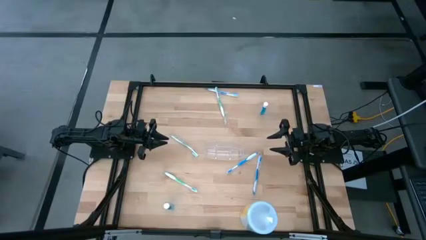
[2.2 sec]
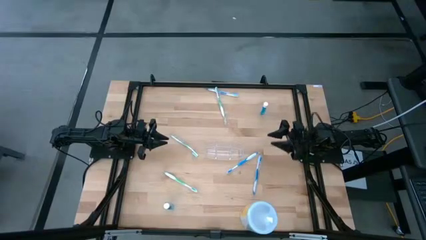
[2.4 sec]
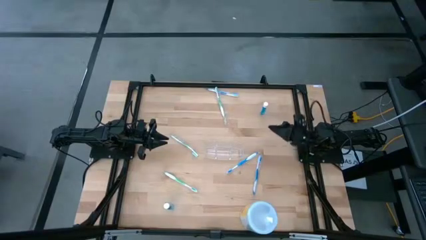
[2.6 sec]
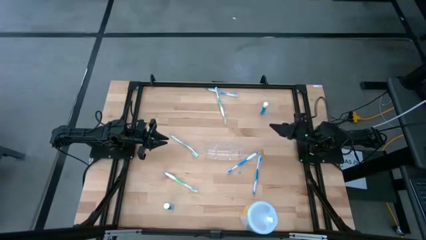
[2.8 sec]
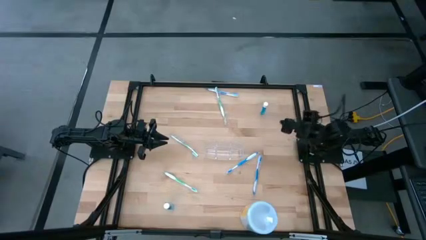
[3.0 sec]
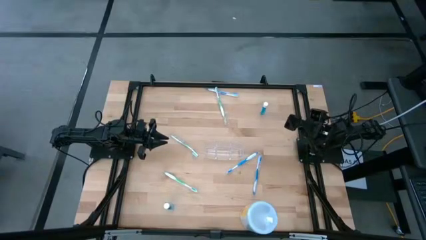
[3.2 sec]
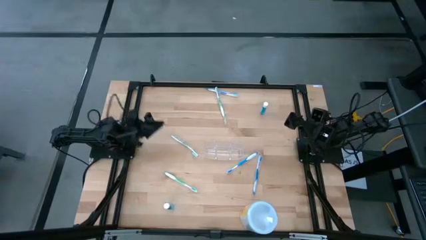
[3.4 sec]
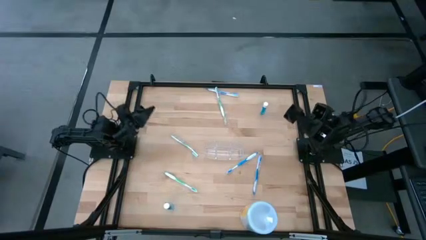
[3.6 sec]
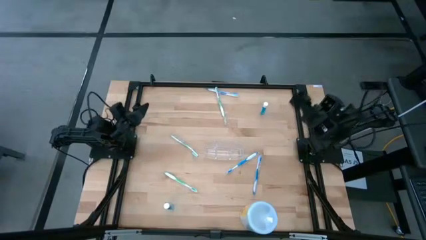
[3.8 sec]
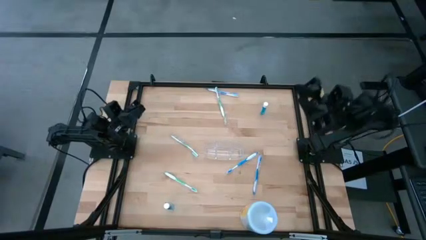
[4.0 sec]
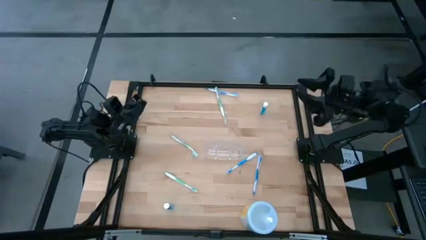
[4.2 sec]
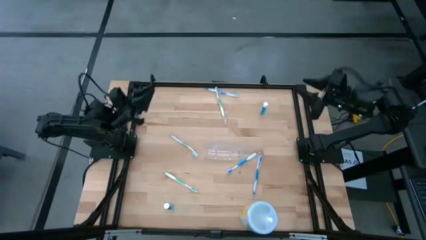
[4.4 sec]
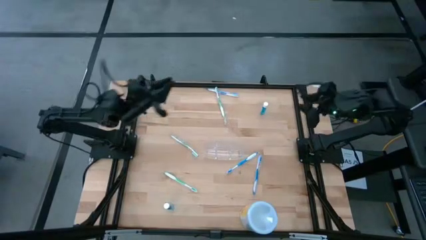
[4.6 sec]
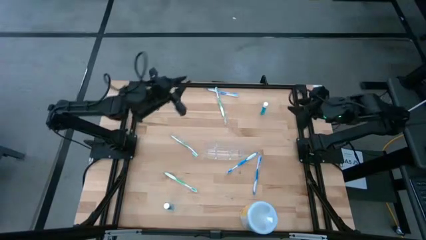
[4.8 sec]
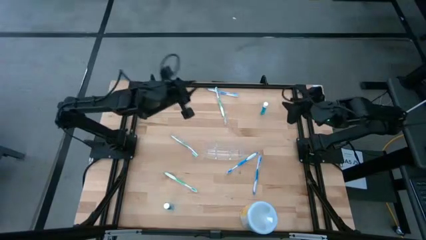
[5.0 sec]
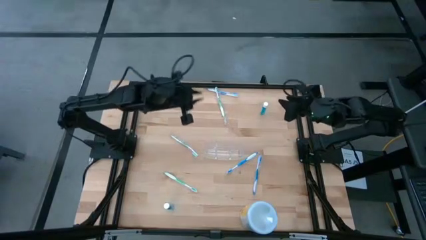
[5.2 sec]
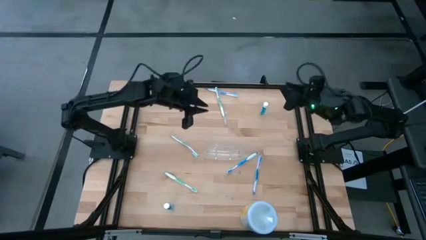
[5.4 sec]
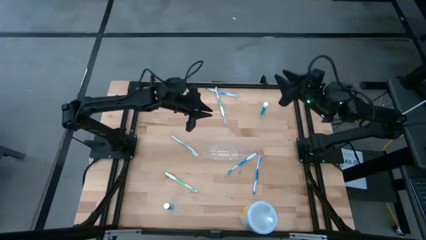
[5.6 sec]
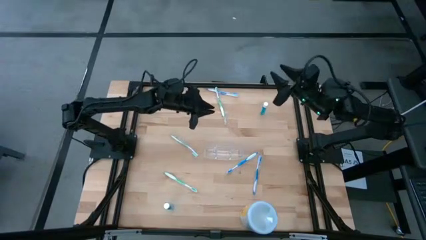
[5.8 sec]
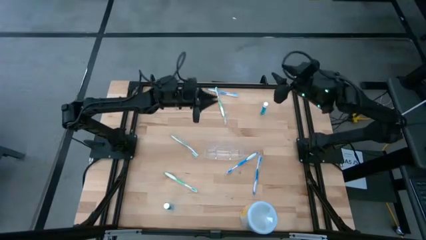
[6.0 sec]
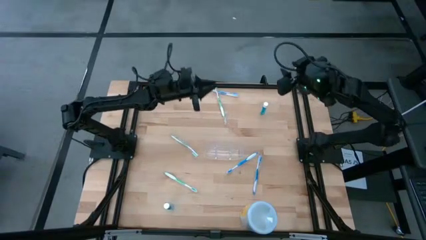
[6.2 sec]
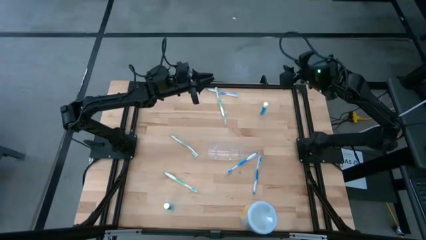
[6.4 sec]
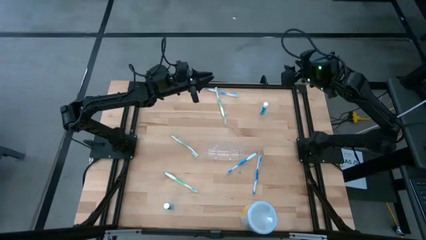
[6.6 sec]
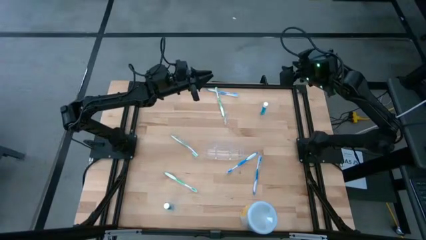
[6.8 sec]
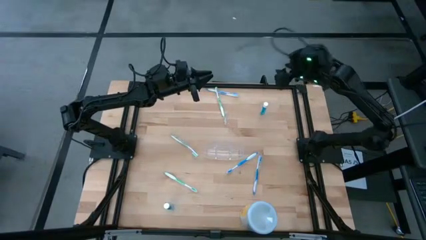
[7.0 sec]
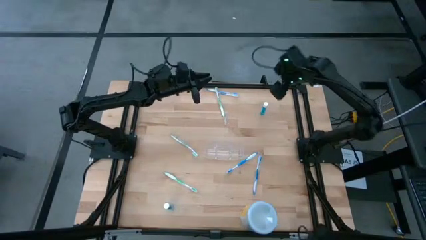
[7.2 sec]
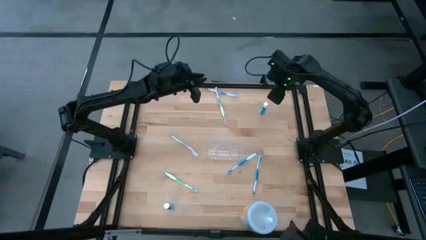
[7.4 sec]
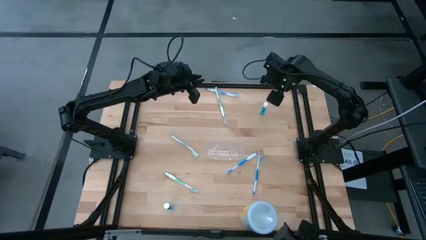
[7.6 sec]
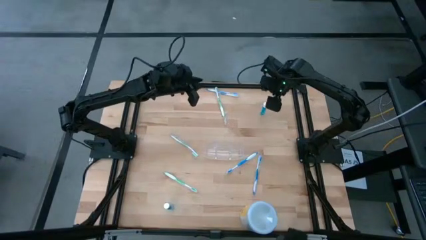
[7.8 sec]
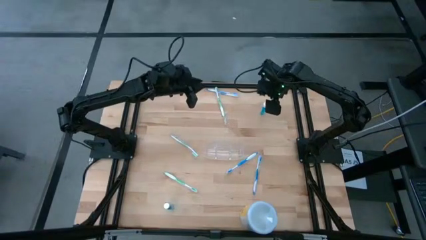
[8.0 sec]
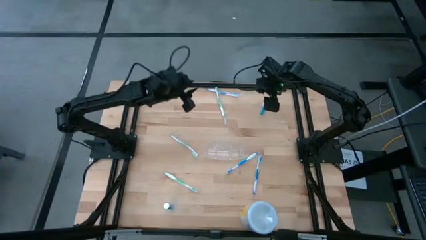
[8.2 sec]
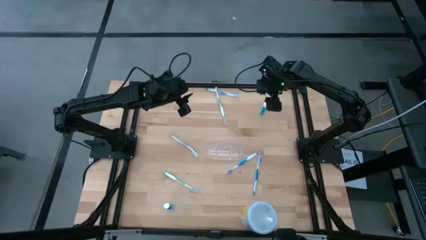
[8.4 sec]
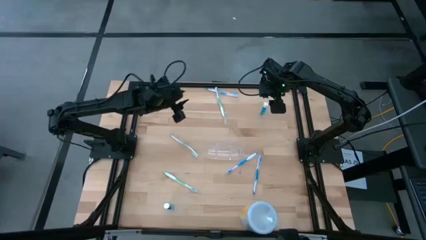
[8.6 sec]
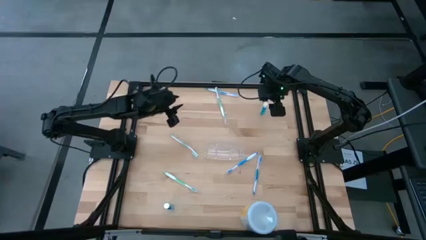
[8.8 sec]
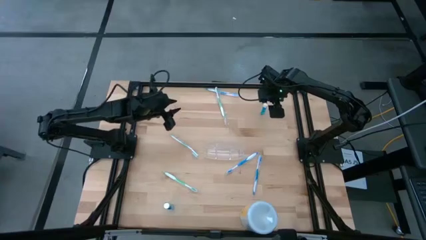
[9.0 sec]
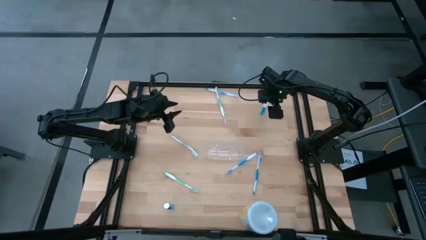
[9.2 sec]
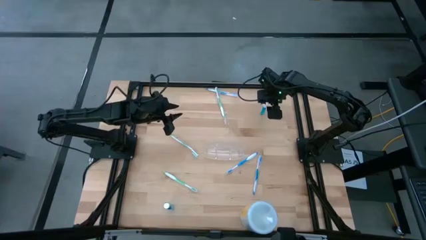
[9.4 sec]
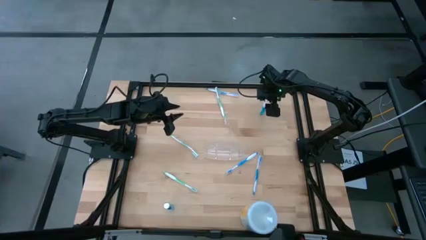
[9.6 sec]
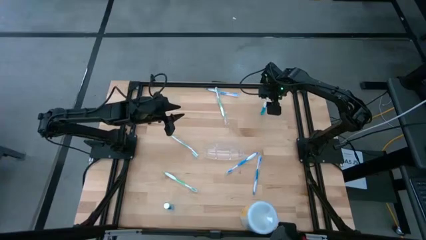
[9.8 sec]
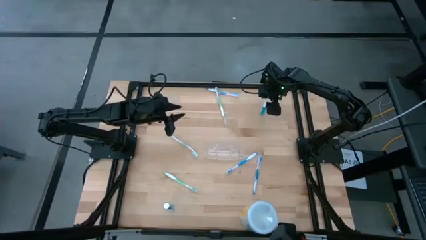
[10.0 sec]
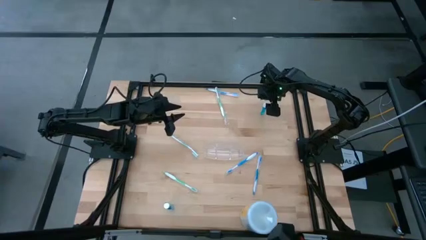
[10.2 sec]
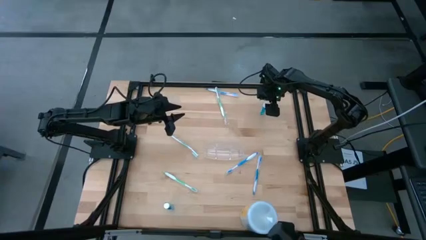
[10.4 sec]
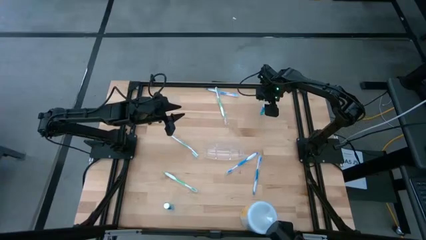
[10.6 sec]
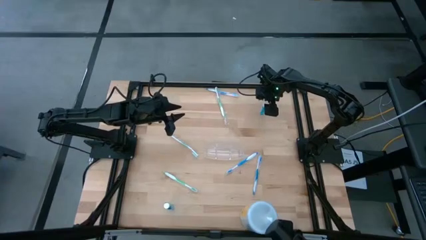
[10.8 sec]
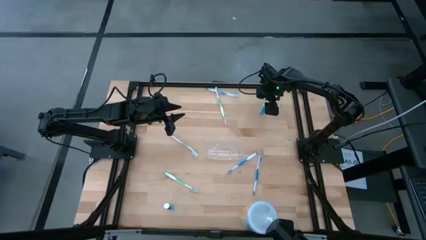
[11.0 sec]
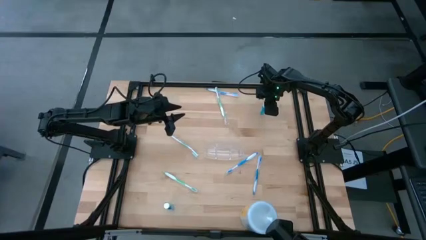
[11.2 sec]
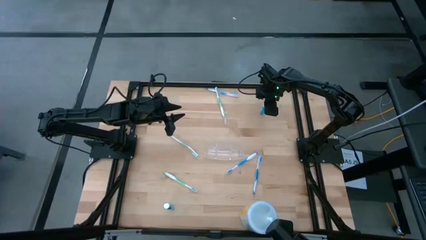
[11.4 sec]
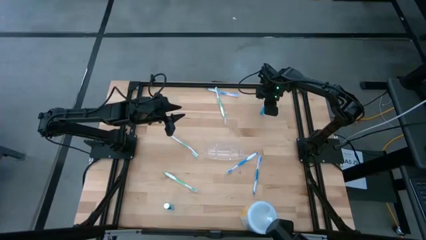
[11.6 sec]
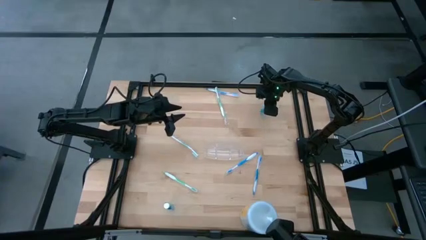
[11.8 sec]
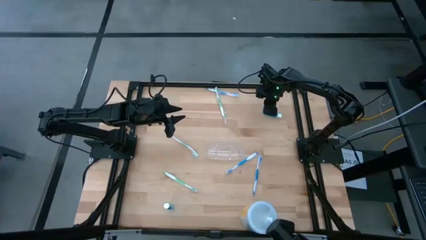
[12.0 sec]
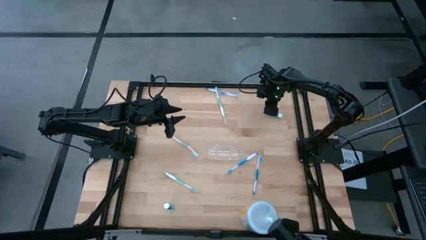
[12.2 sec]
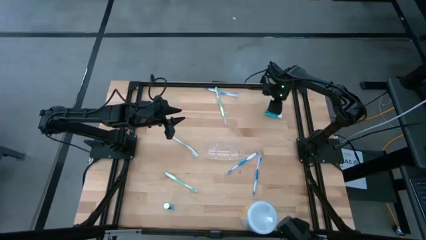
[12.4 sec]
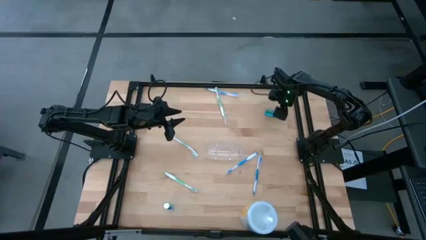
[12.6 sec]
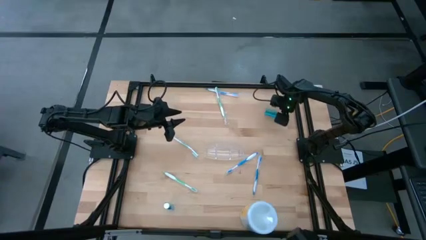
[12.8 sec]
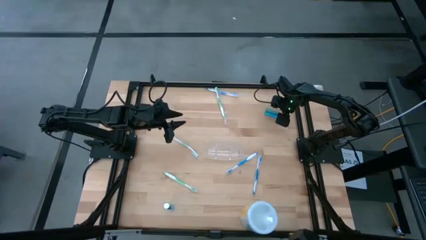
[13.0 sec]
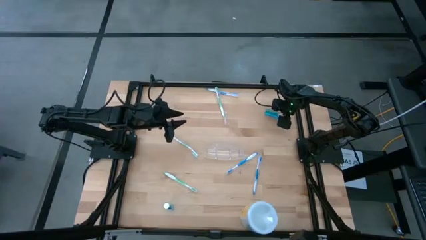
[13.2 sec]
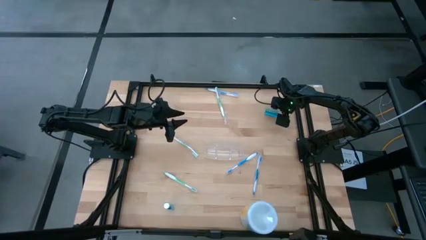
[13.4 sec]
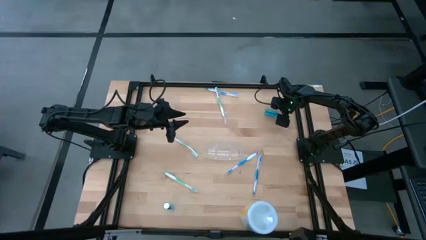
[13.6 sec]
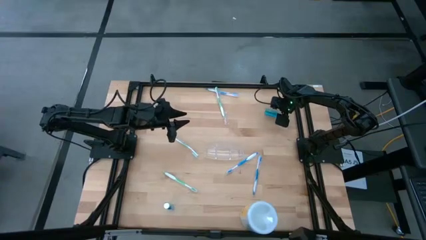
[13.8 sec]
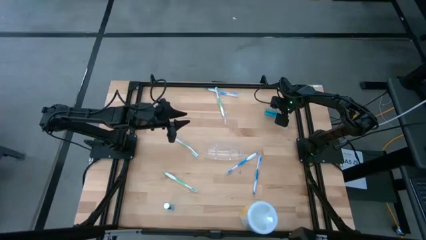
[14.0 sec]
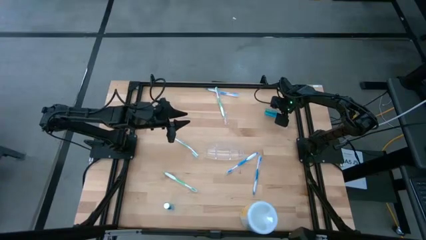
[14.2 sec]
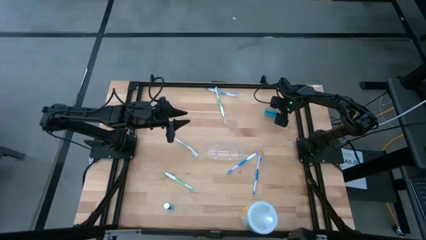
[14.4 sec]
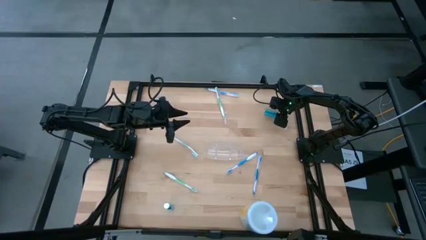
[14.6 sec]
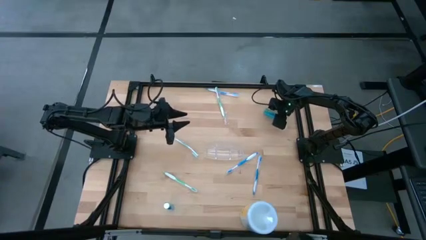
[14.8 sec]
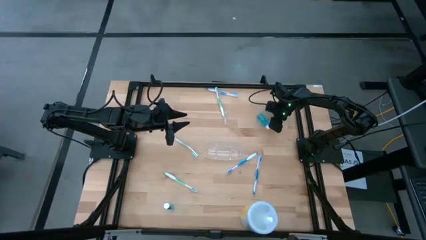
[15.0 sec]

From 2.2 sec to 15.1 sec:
Task: Pick & Place toothbrushing station
Put the top blue mouthwash into the transparent organizer
